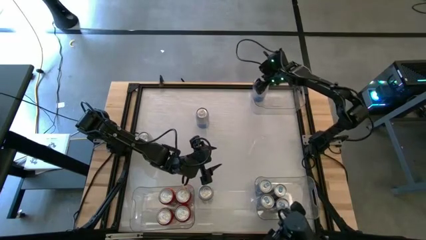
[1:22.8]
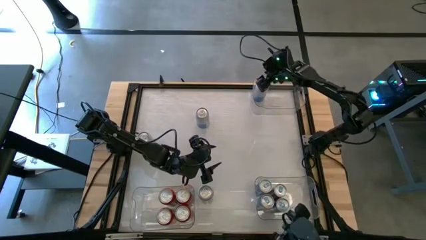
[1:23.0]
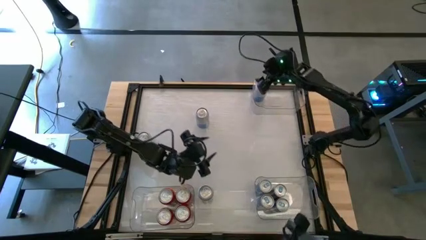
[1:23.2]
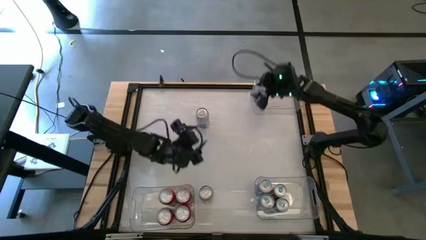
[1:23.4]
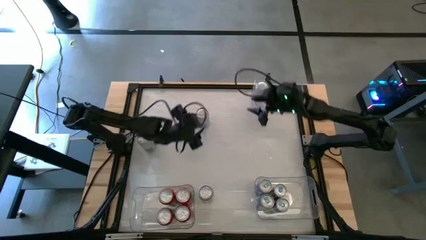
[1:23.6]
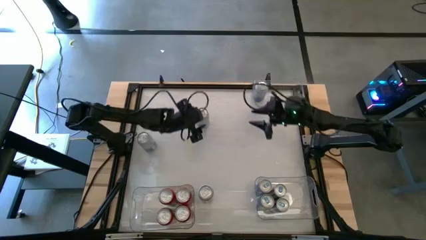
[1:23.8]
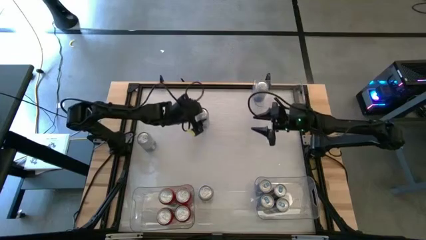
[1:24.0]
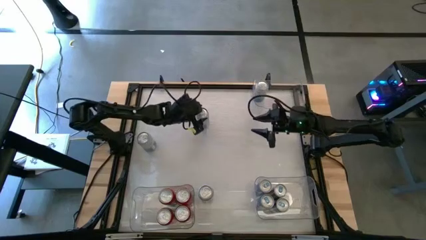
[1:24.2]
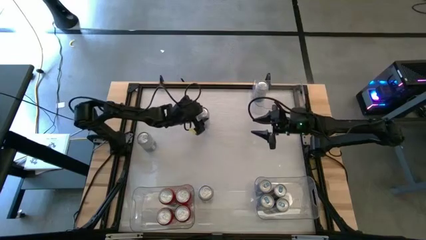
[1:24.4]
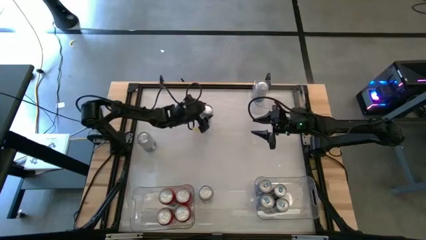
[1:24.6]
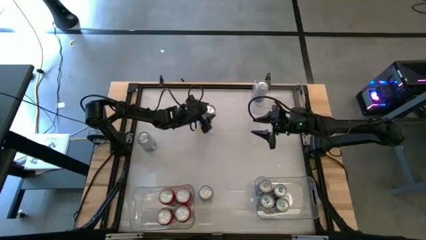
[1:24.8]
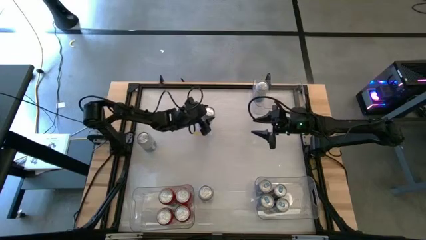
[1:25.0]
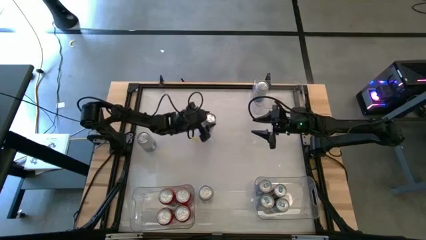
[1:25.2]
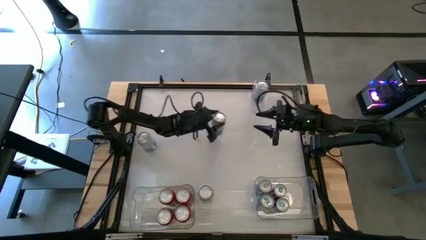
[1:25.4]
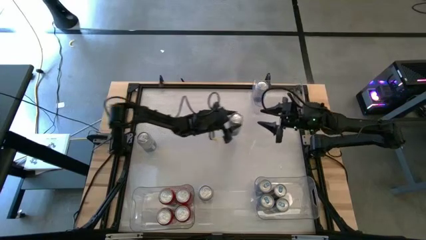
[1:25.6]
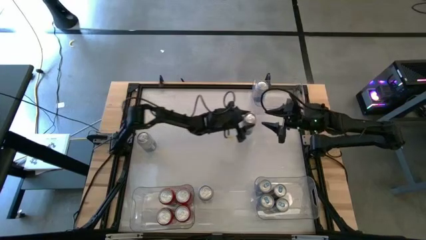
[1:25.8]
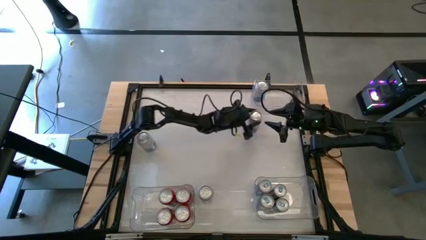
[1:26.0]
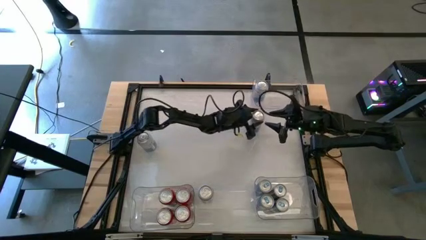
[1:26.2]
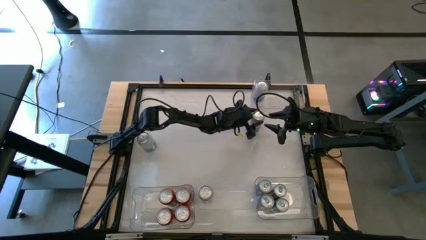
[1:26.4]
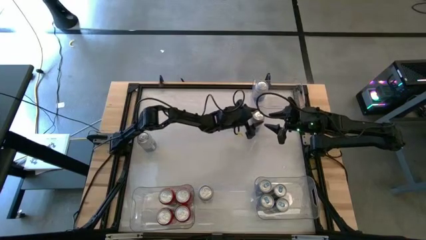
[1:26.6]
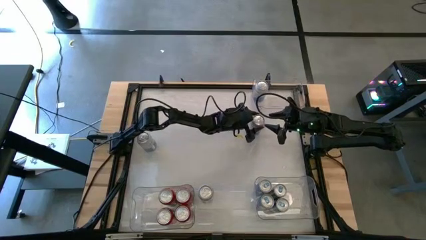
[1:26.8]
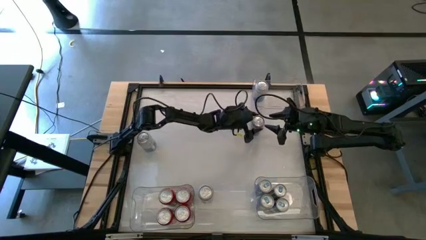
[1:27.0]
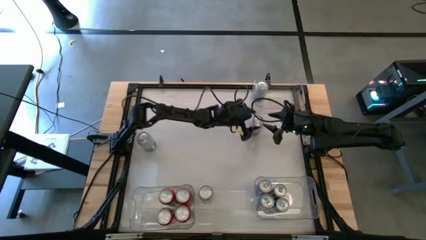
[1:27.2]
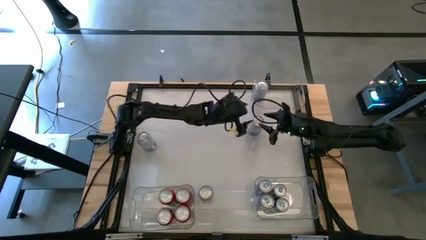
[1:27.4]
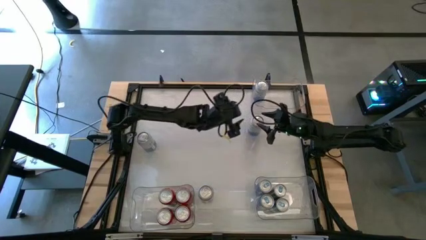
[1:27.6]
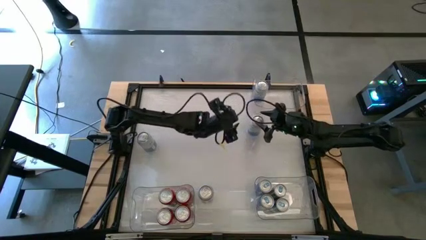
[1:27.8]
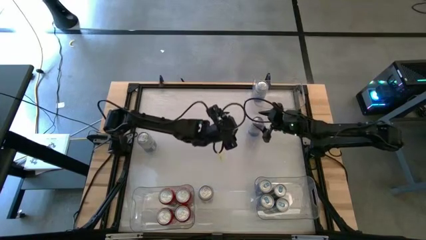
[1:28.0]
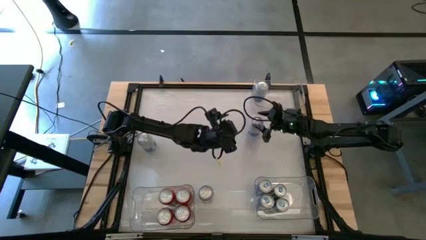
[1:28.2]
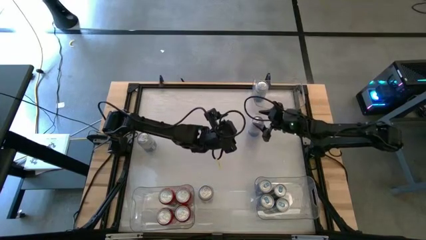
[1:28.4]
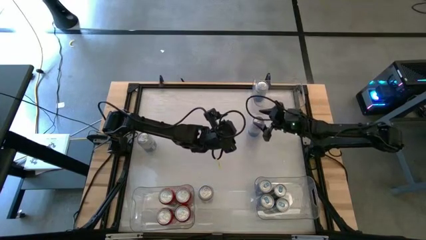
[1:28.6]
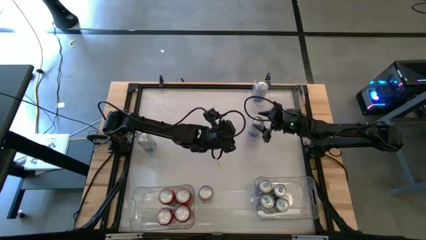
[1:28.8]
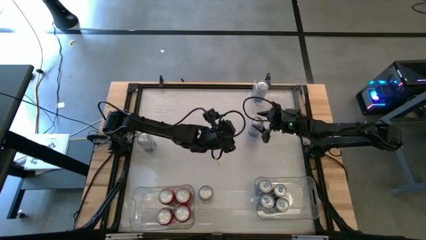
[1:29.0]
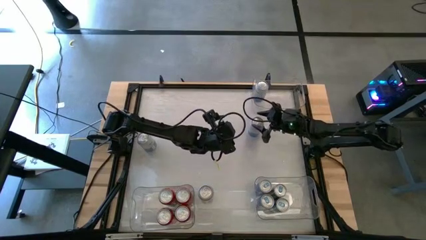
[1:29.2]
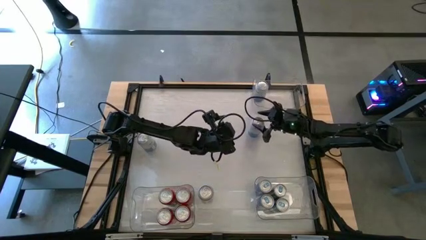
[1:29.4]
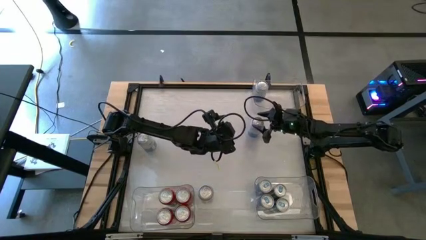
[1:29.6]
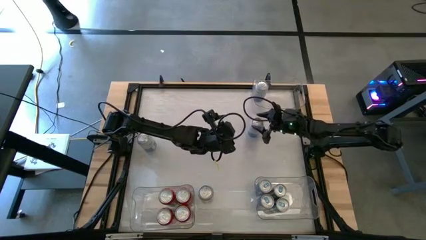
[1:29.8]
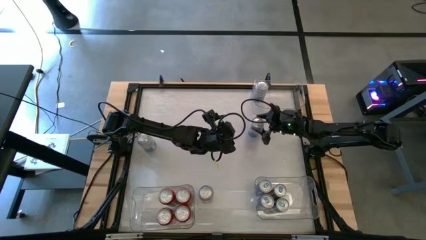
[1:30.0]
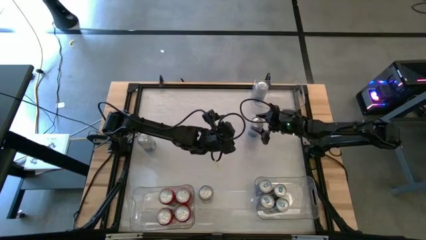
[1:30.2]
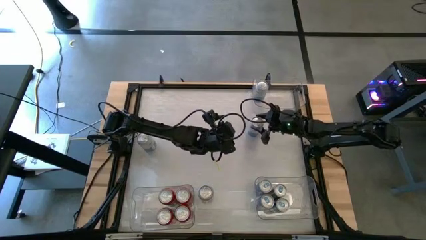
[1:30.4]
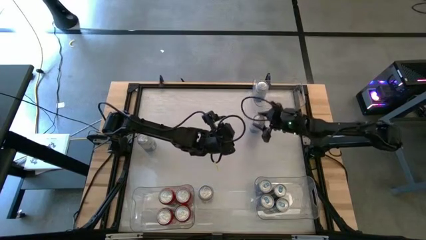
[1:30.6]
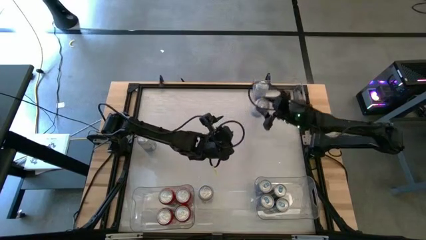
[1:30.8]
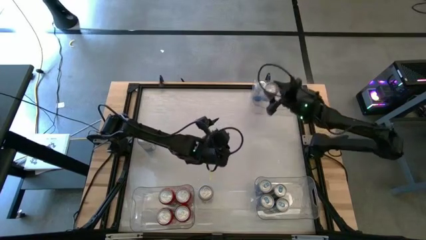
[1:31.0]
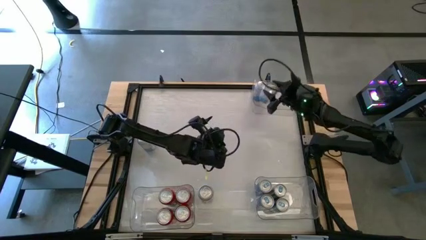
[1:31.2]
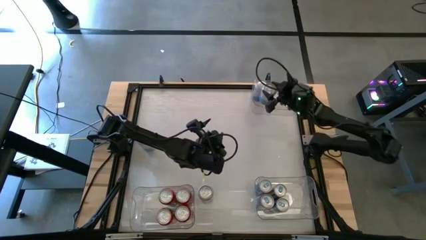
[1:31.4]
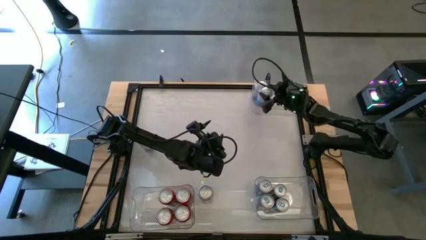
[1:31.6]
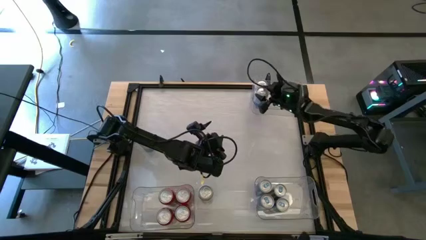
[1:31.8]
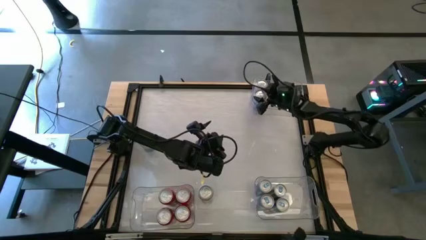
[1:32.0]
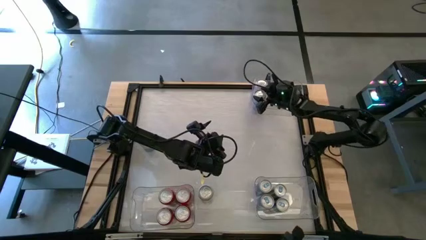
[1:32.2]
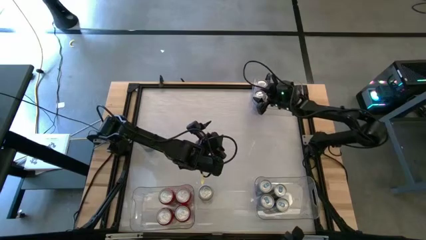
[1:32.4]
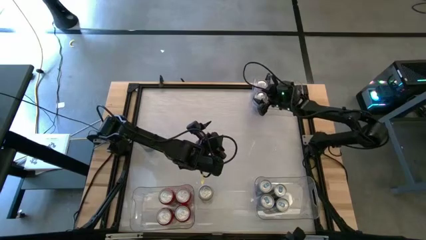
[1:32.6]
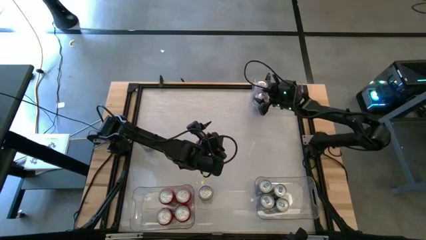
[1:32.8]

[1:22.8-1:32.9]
Task: Sort soda cans
Put the top right white soda can into the top right transparent bin

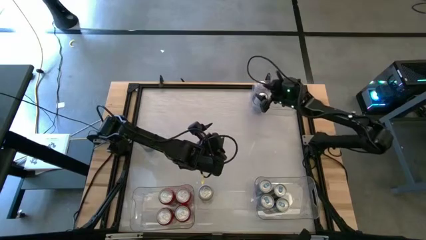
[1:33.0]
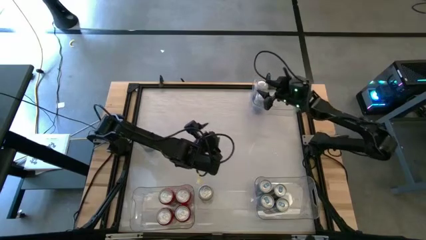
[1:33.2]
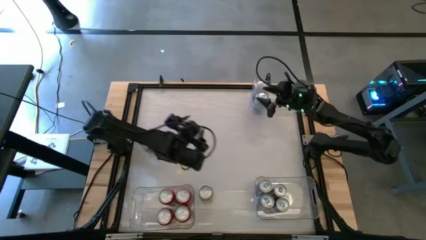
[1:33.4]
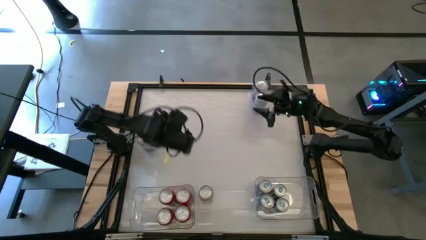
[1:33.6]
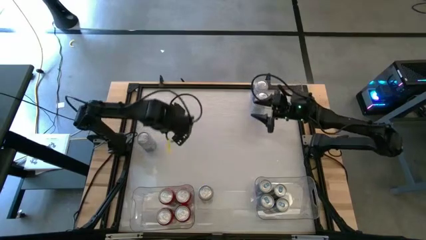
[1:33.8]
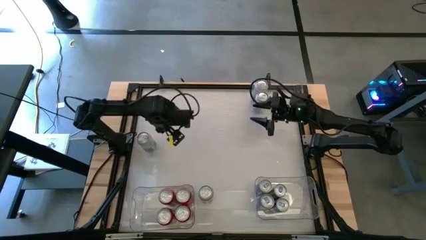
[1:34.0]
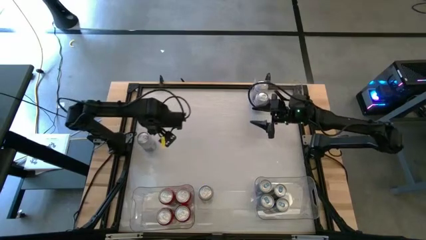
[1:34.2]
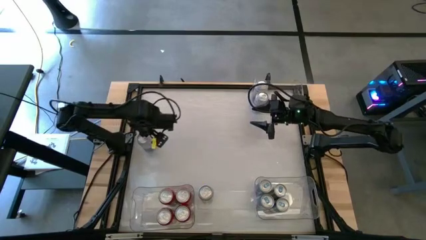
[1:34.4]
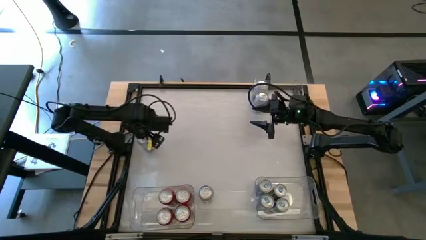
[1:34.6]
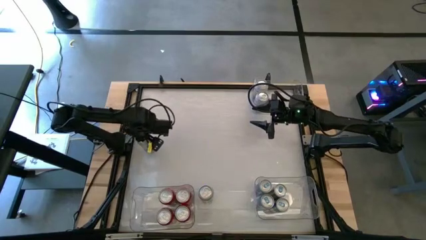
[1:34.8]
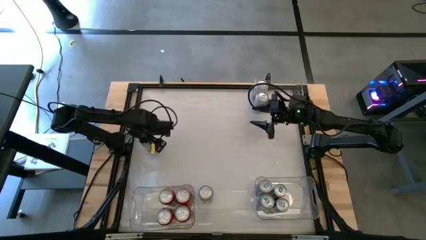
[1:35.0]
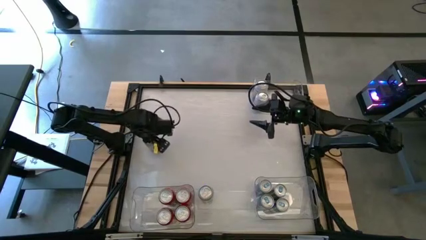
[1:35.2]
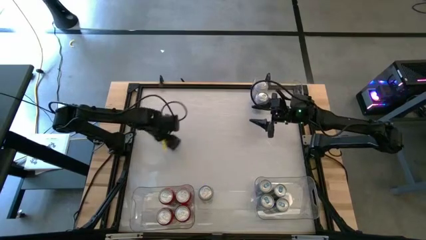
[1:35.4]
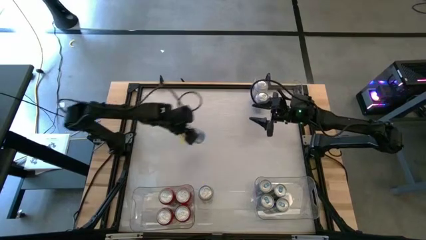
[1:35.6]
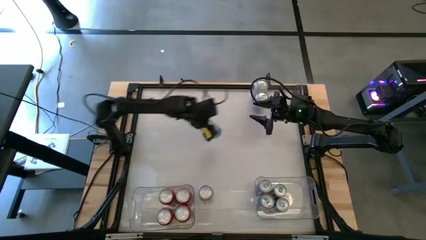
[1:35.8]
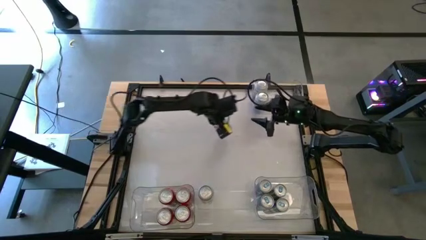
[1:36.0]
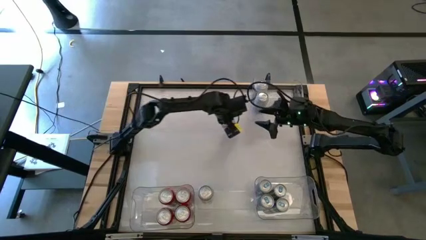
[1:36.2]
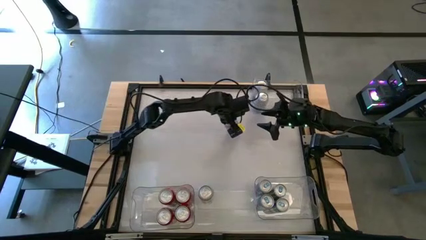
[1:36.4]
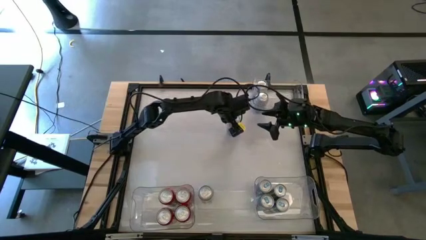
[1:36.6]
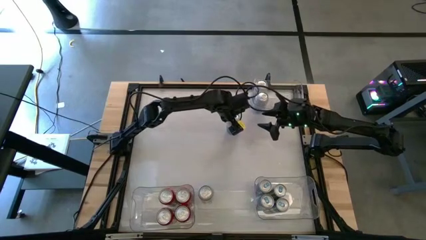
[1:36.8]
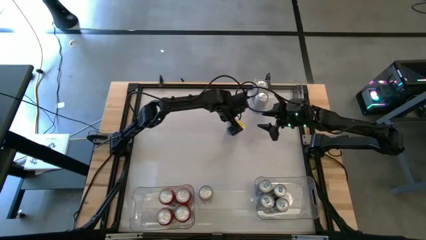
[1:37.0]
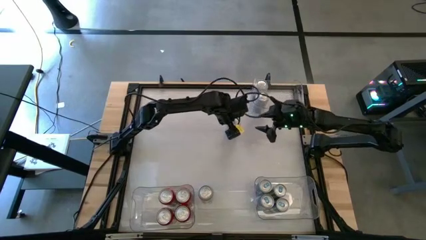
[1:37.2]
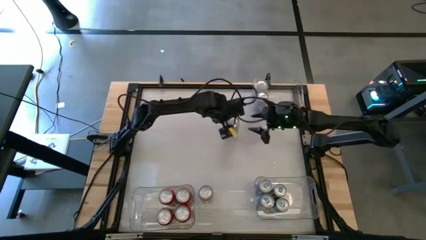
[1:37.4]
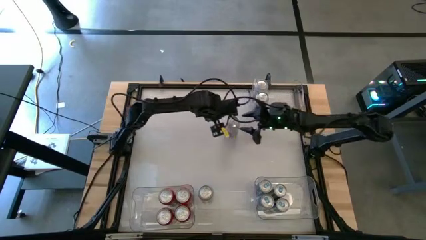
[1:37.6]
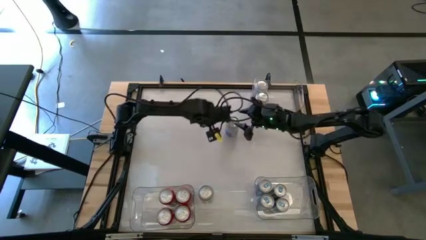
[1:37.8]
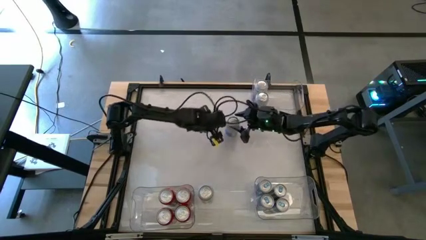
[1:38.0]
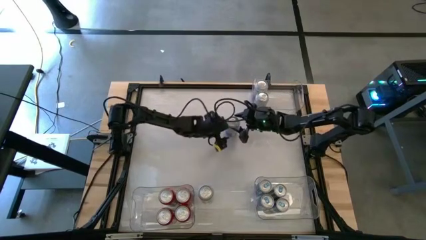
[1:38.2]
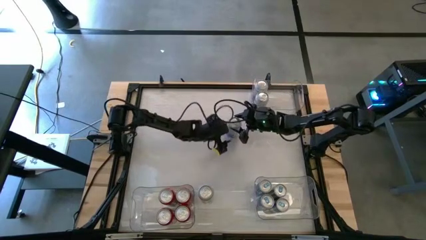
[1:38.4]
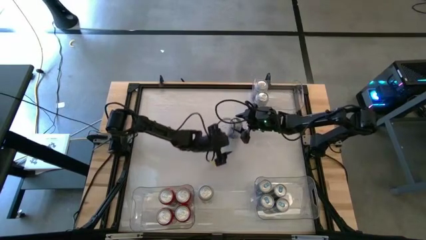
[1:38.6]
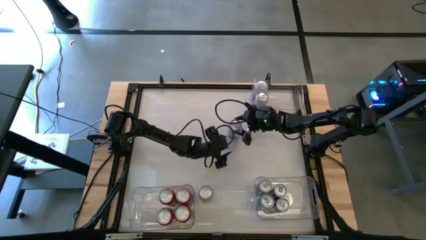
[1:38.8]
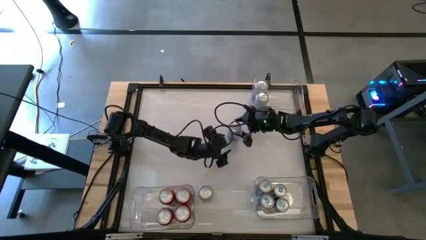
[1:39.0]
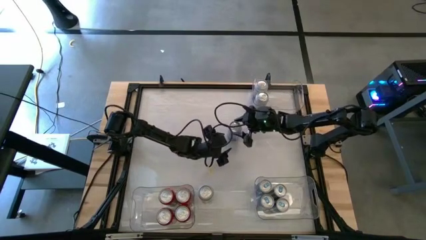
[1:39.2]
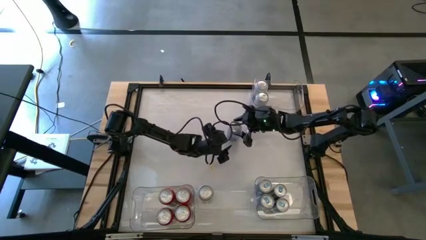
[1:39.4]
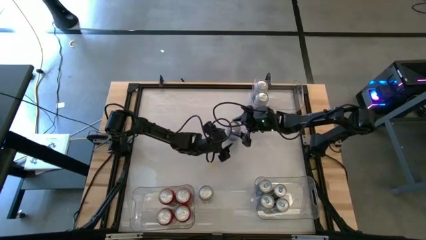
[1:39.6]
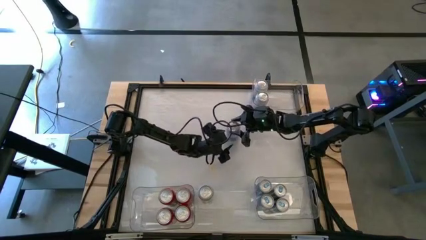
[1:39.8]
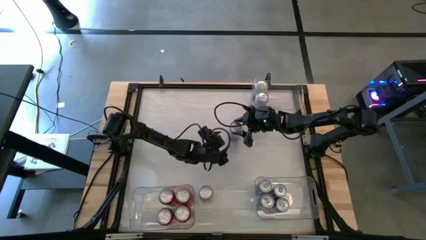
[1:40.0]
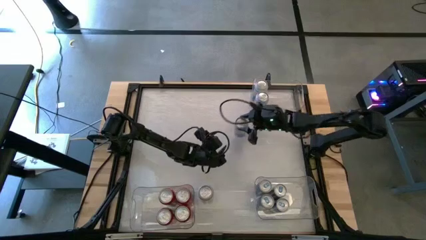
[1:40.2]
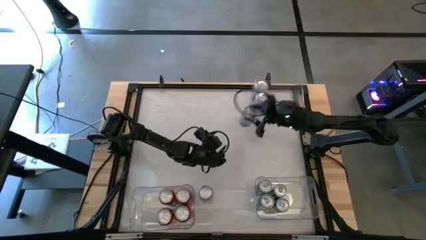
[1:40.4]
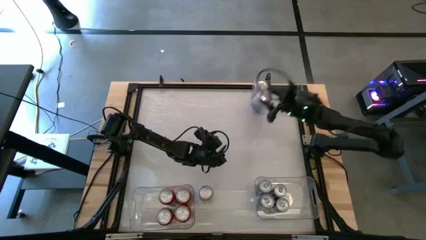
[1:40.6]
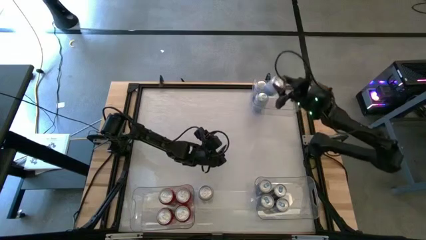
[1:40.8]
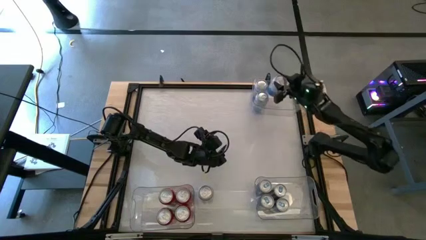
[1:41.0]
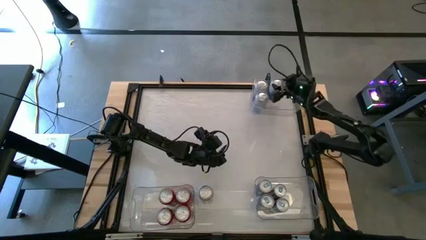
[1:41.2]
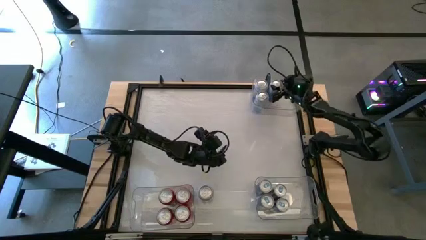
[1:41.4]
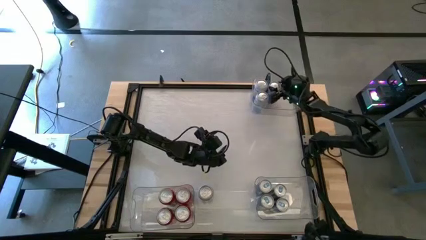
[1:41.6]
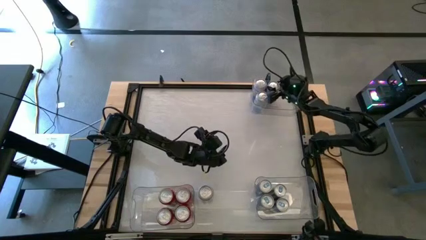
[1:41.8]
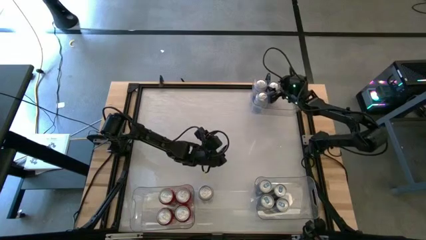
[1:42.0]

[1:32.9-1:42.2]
Put the top blue-white soda can into the top right transparent bin
